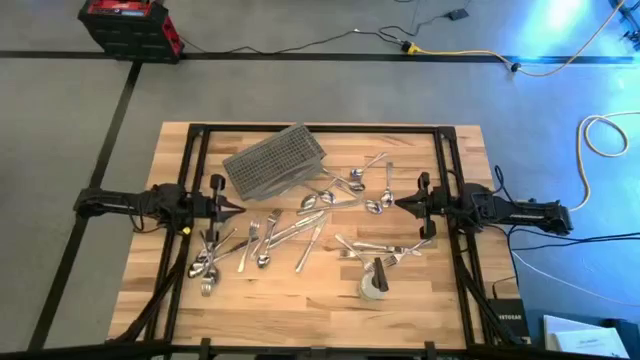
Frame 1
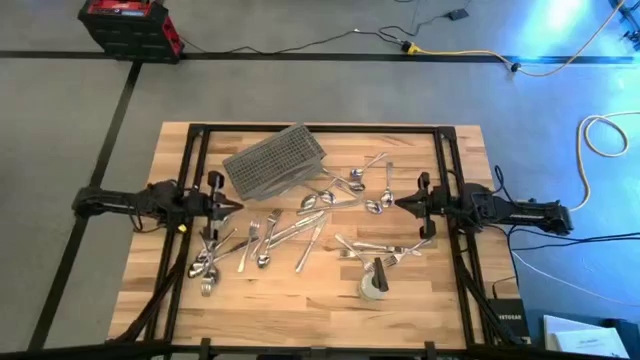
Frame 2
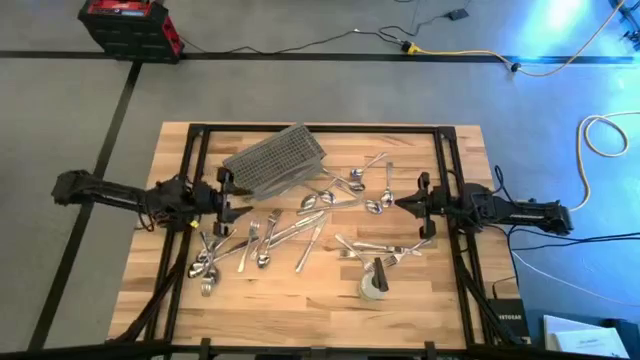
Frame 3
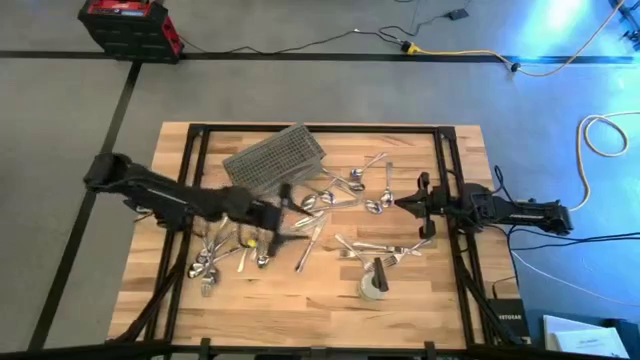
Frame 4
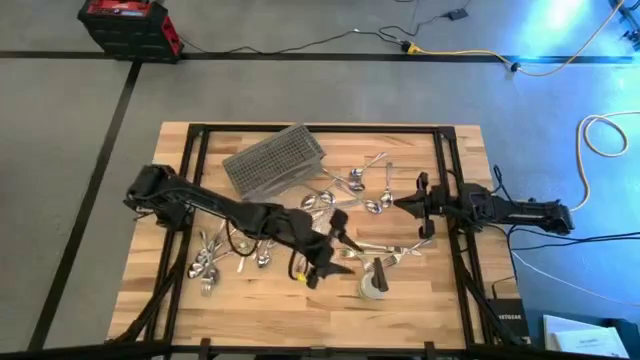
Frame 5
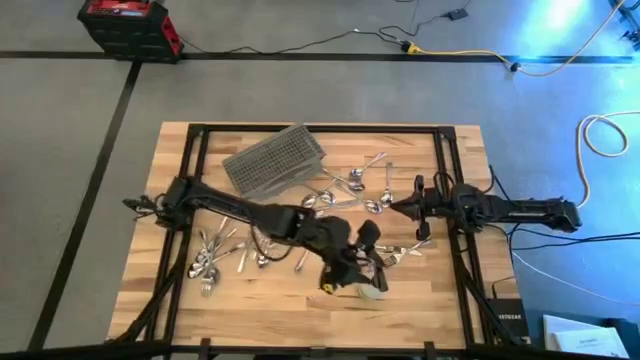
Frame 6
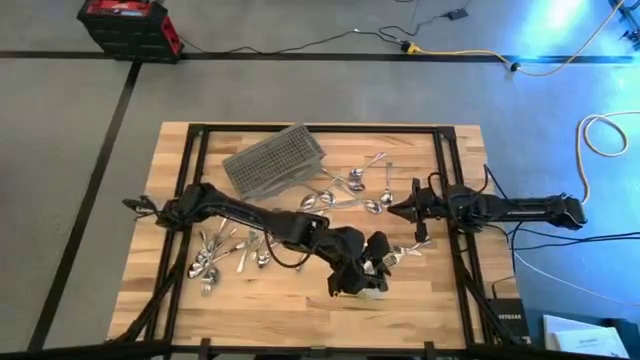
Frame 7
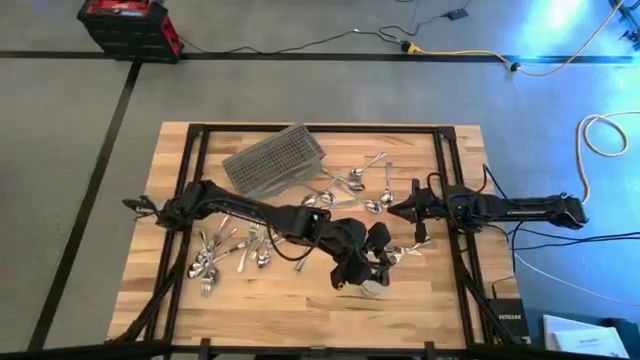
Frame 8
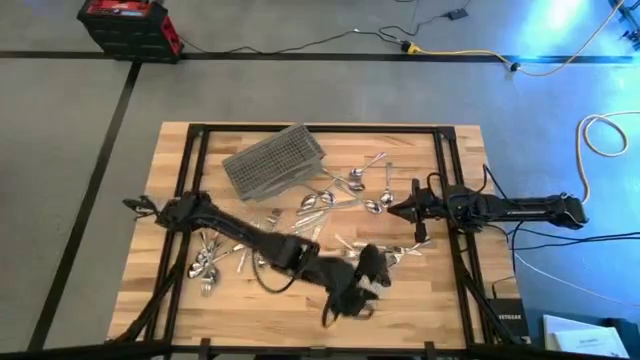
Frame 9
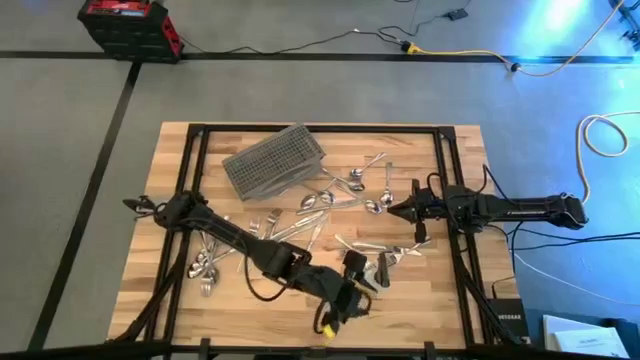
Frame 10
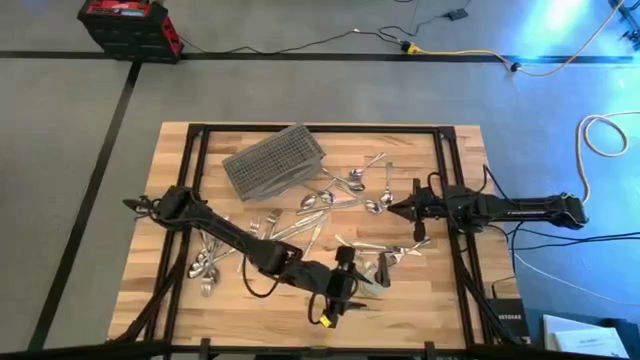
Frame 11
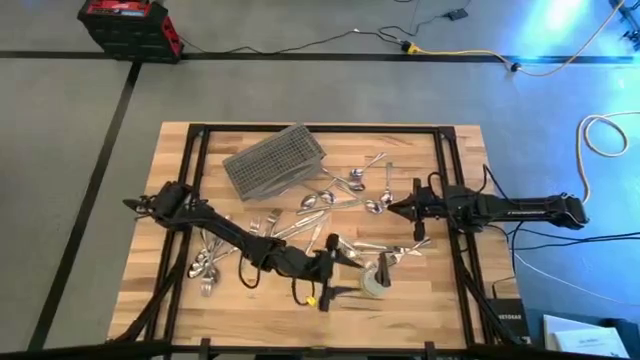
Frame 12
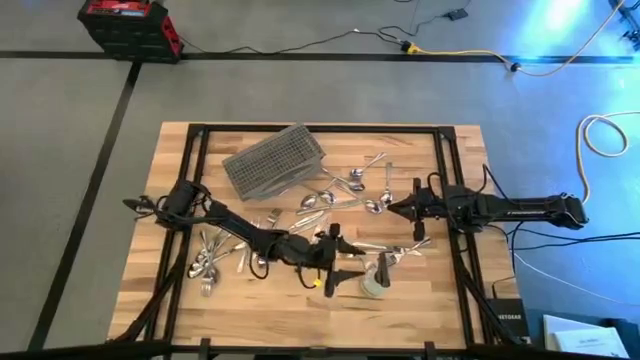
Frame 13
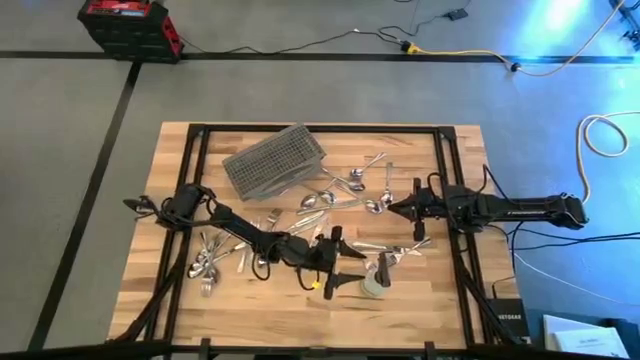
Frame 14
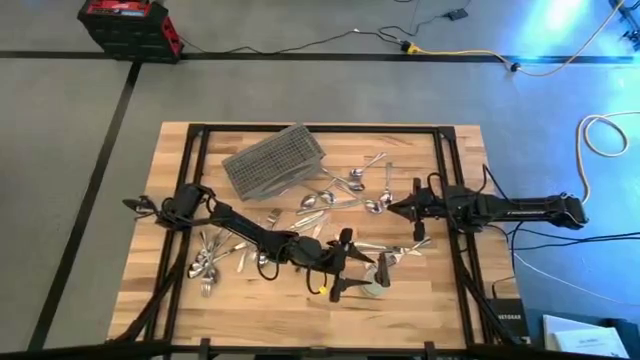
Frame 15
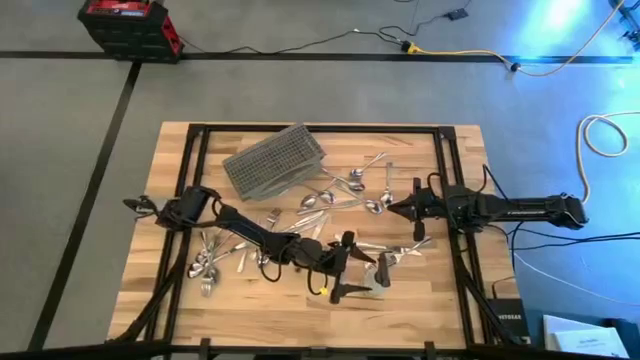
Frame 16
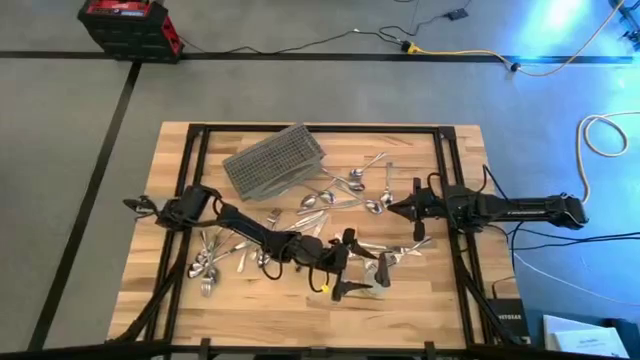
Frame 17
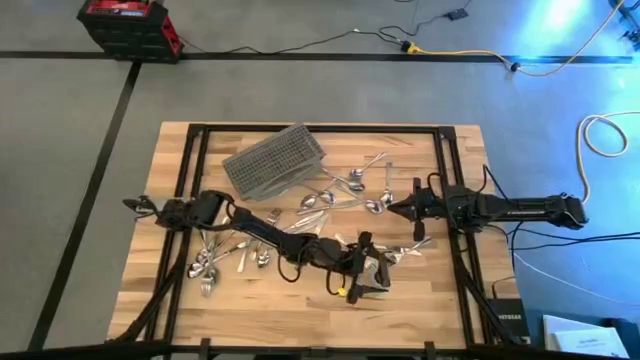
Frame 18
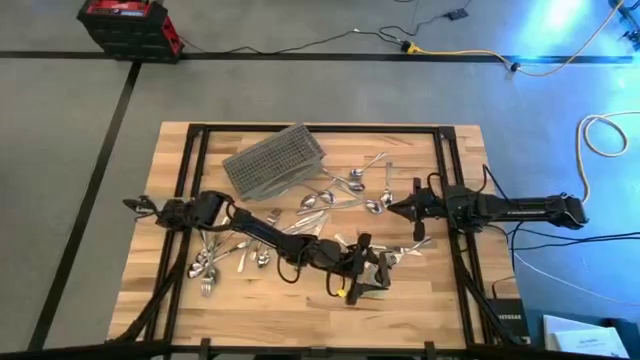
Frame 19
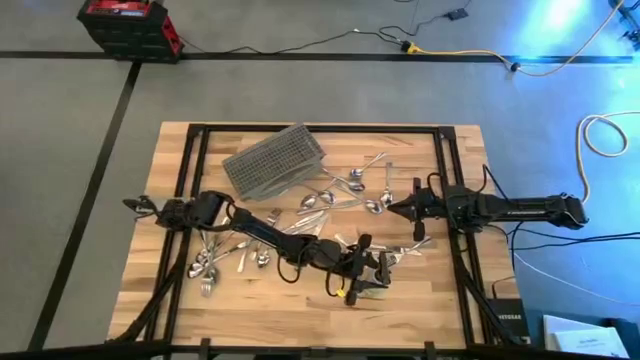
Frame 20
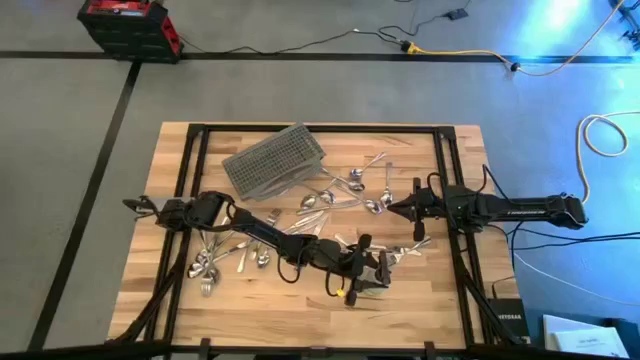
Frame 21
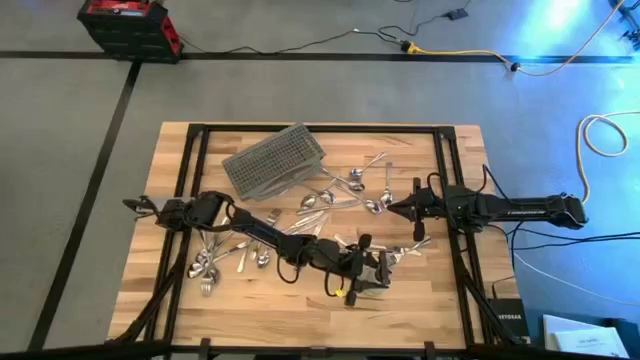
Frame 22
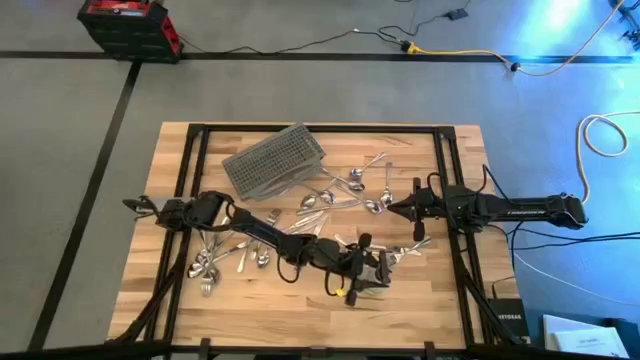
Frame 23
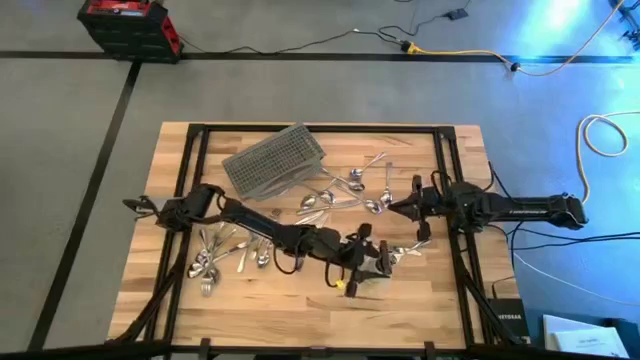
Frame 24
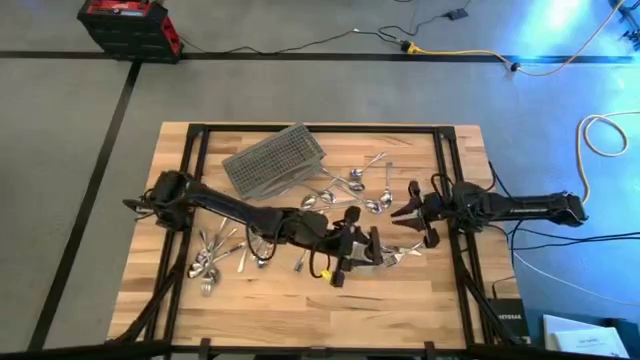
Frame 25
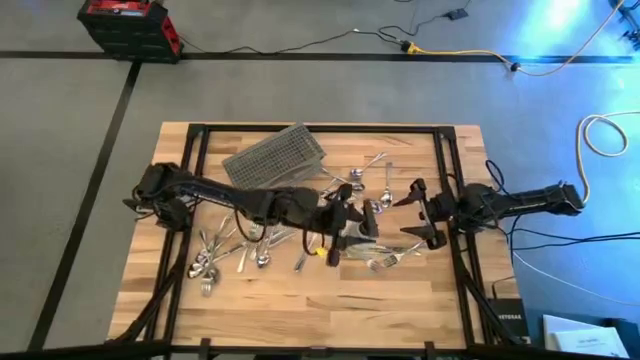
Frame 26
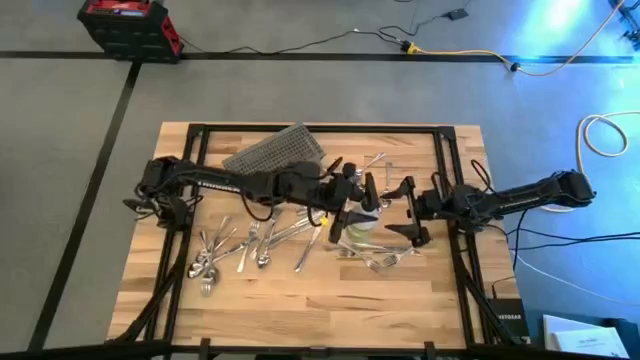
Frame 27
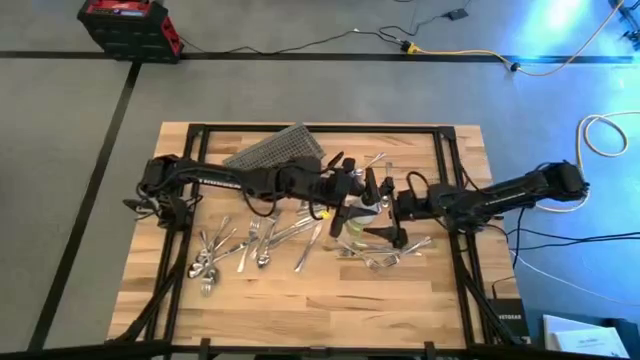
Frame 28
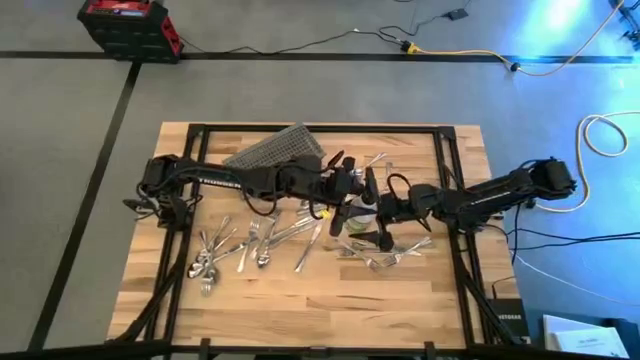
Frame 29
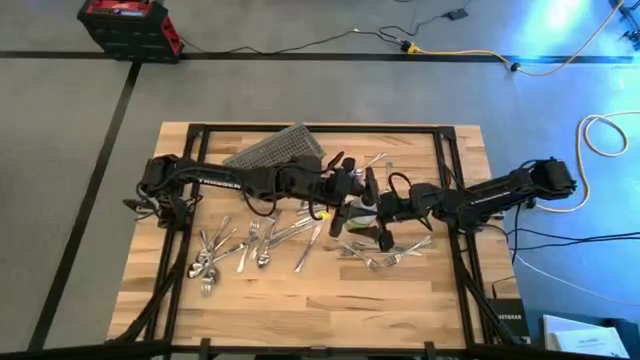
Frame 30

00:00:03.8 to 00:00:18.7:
Task: Sort silverware
Move the white spray bottle to the top right of the table

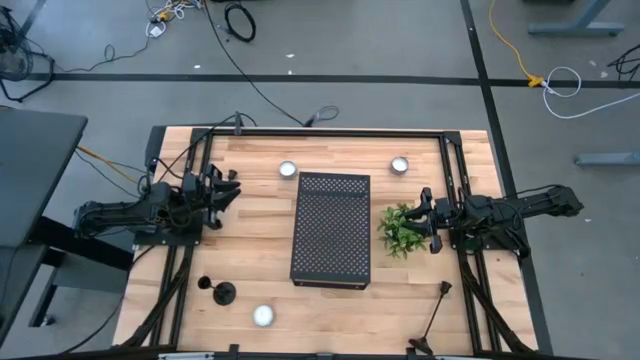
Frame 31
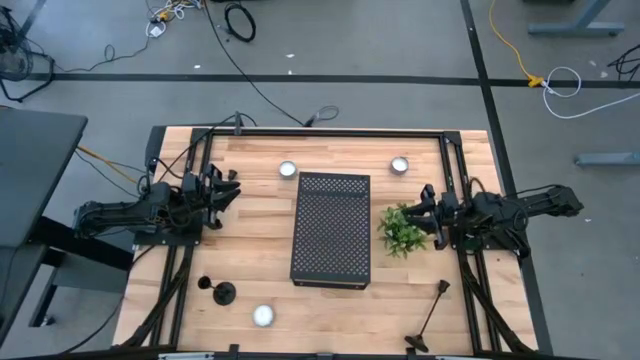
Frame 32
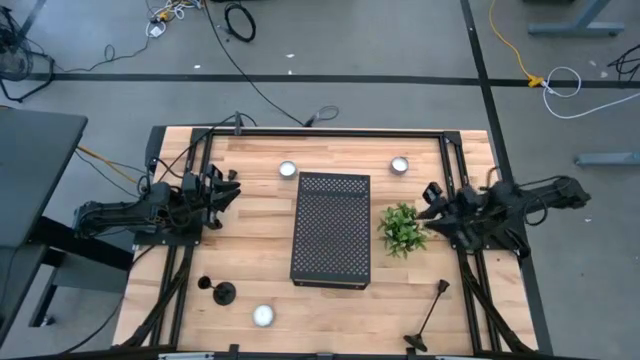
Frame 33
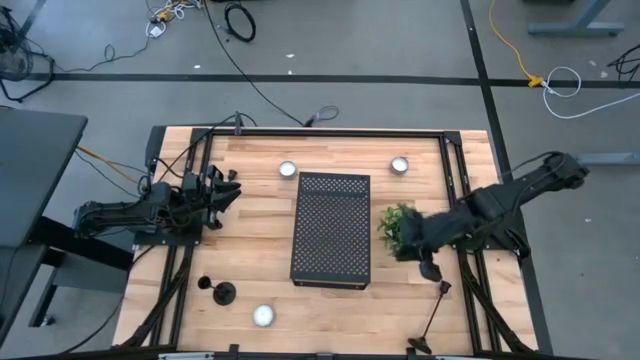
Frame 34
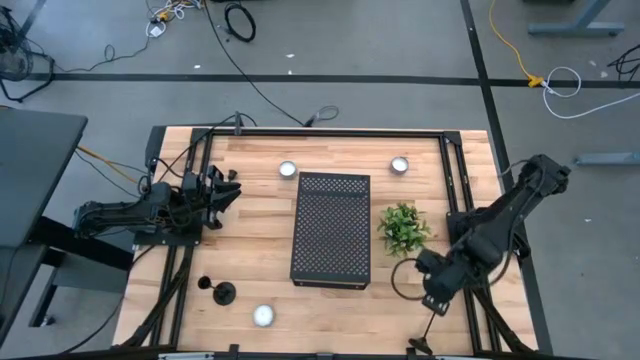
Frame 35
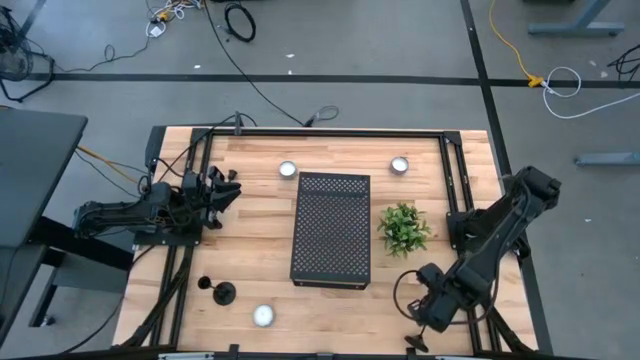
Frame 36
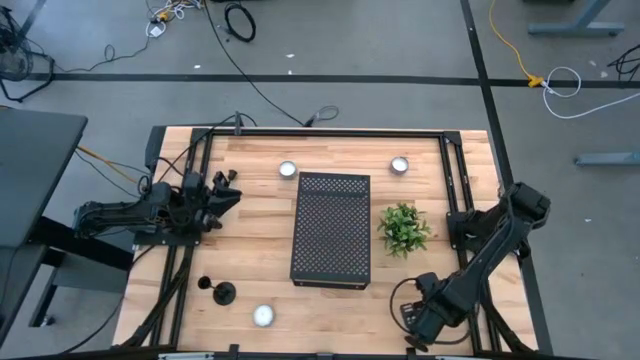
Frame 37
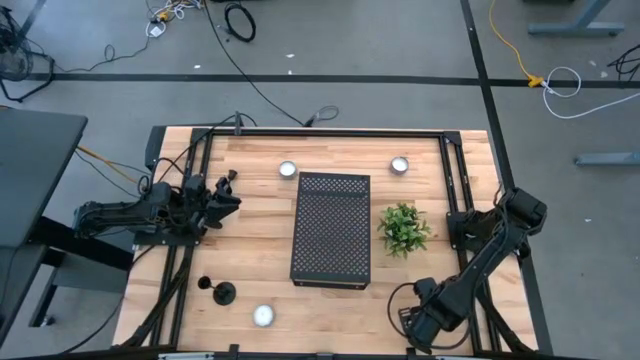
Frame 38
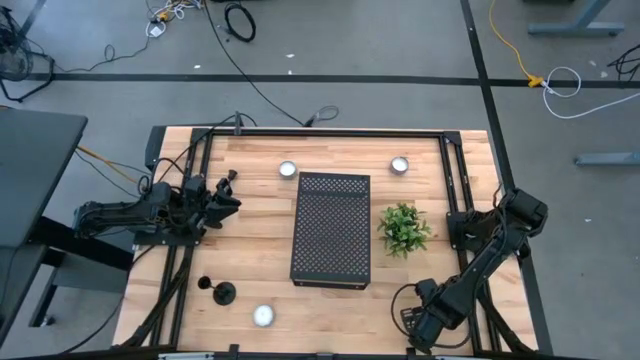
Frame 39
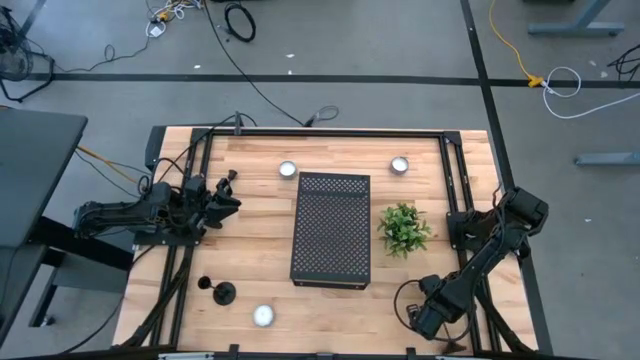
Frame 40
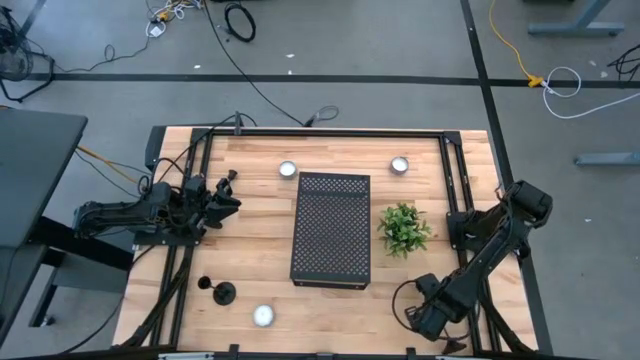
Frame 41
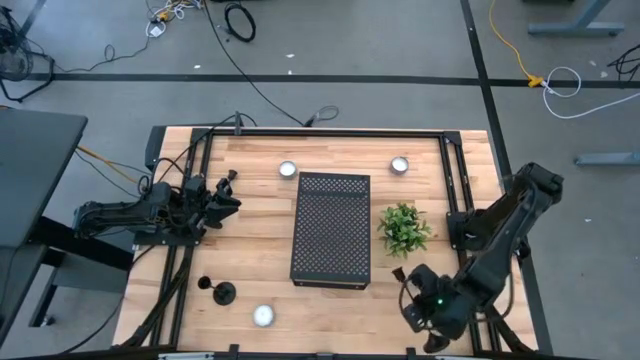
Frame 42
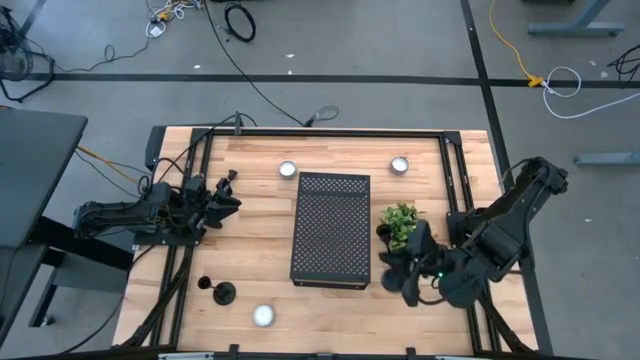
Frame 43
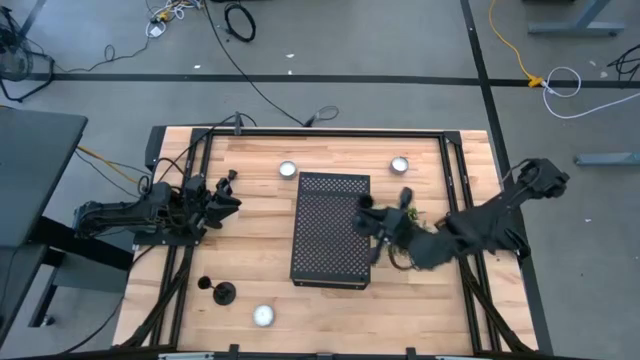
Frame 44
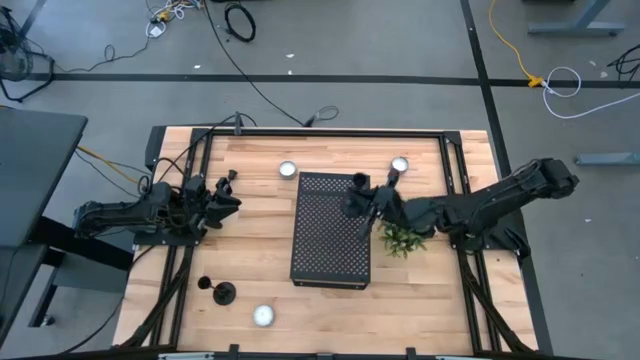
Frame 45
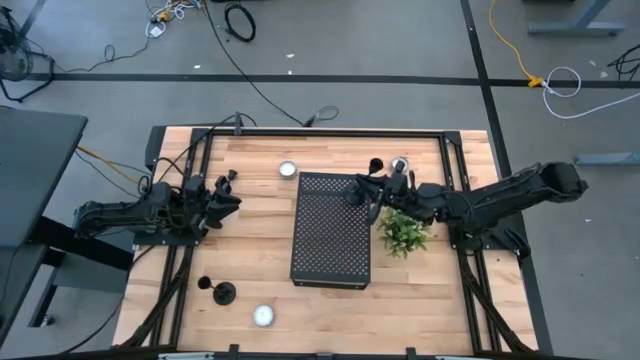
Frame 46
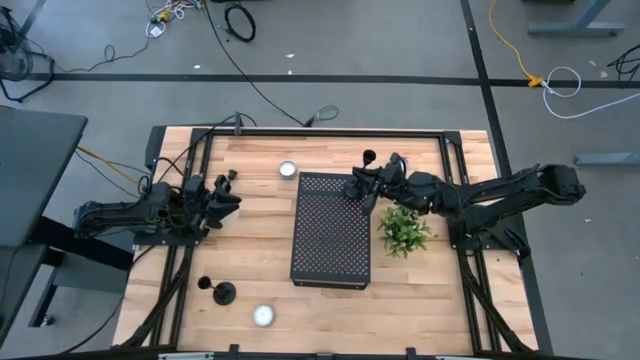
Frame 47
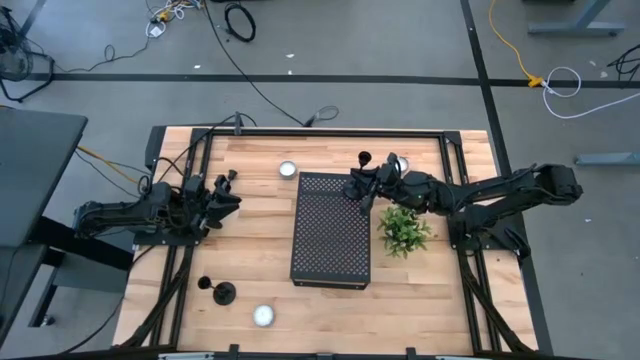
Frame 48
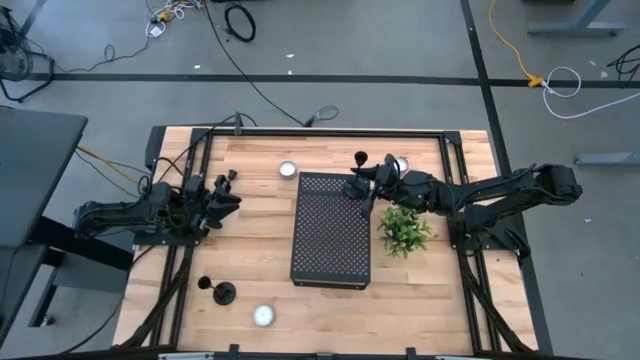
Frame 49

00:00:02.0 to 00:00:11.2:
Task: Pick & Place candle stick holders
Put the right black candle holder on the shelf
